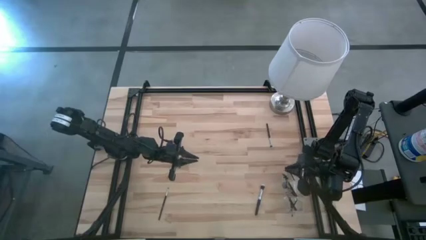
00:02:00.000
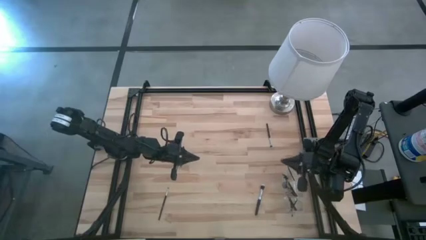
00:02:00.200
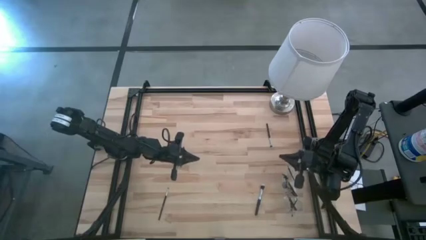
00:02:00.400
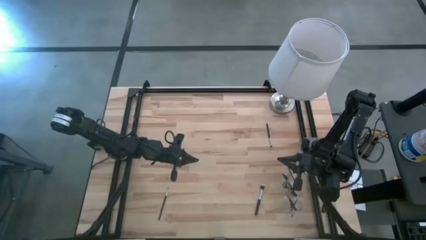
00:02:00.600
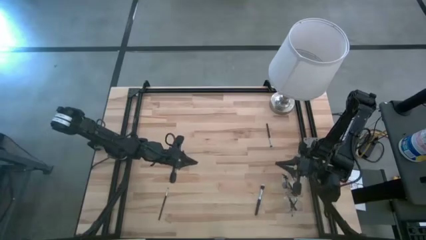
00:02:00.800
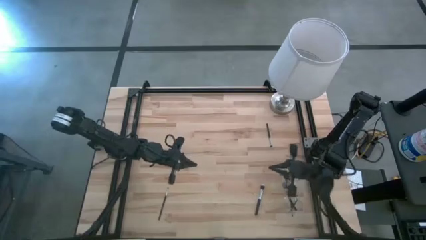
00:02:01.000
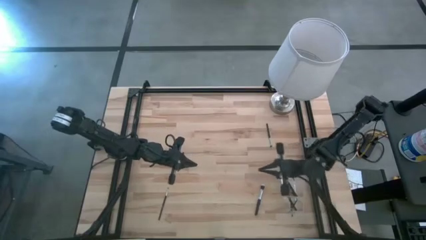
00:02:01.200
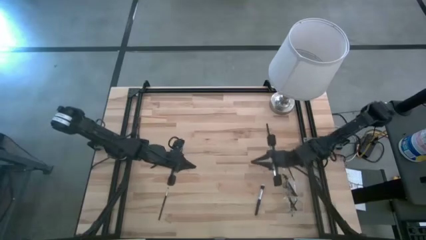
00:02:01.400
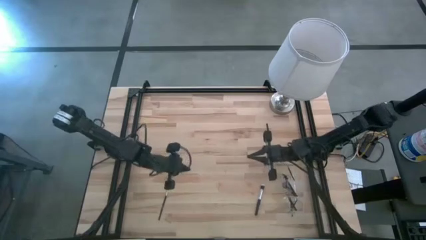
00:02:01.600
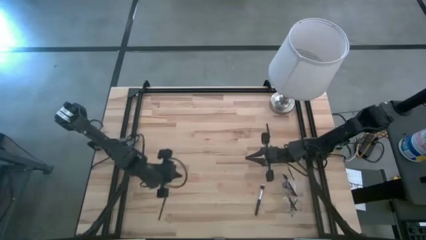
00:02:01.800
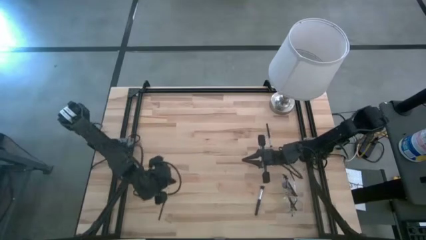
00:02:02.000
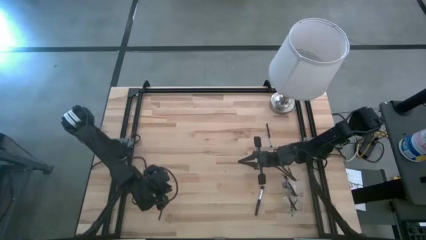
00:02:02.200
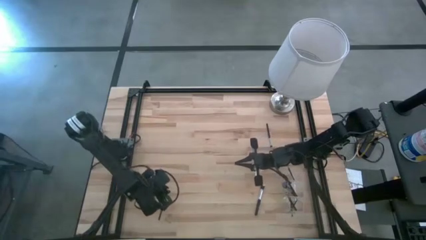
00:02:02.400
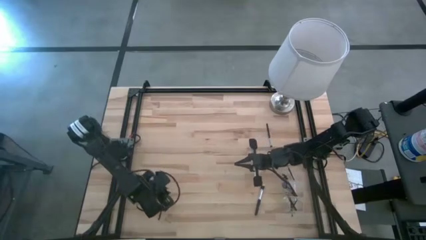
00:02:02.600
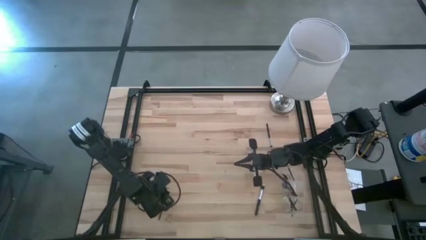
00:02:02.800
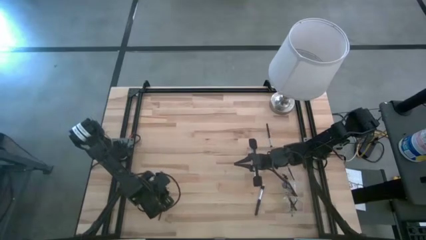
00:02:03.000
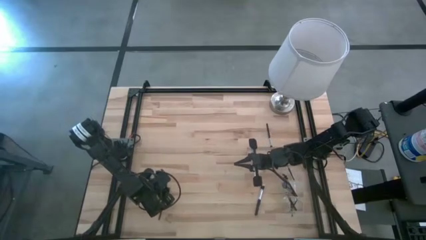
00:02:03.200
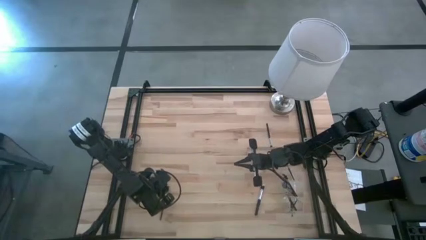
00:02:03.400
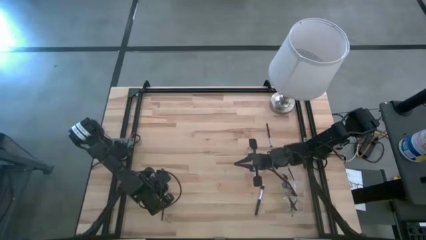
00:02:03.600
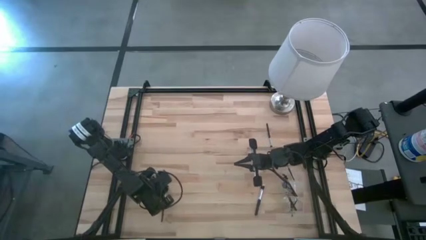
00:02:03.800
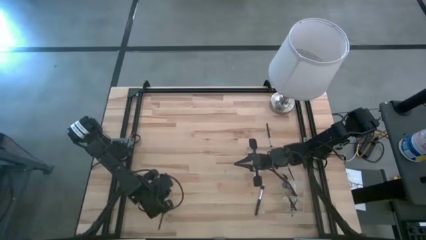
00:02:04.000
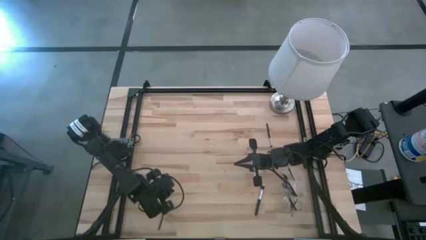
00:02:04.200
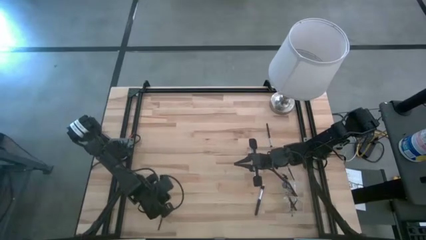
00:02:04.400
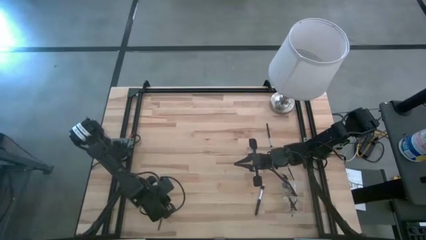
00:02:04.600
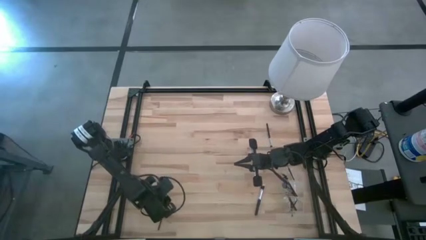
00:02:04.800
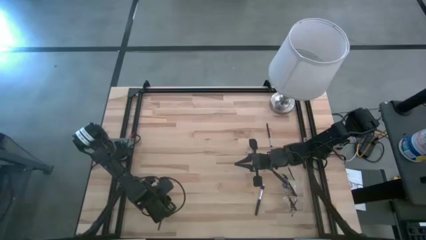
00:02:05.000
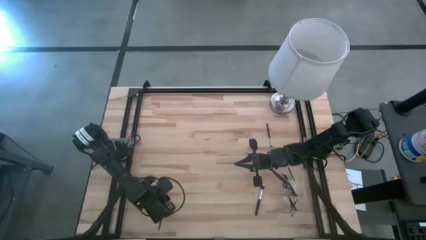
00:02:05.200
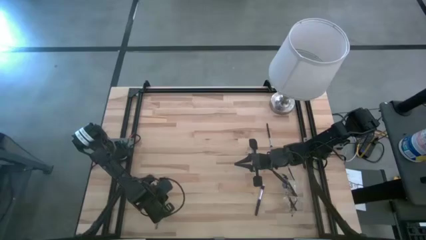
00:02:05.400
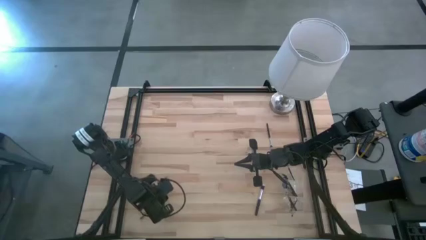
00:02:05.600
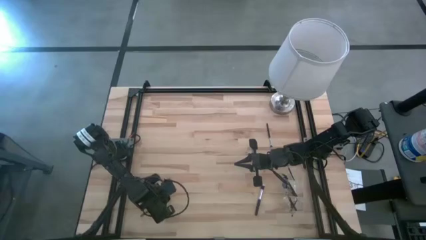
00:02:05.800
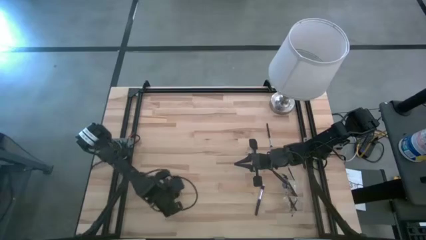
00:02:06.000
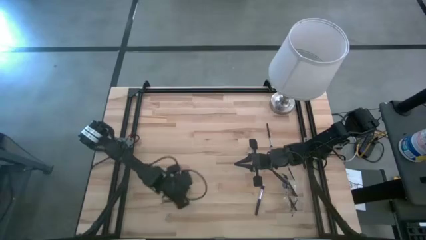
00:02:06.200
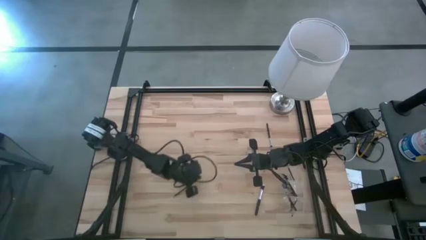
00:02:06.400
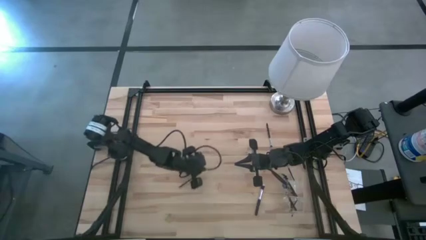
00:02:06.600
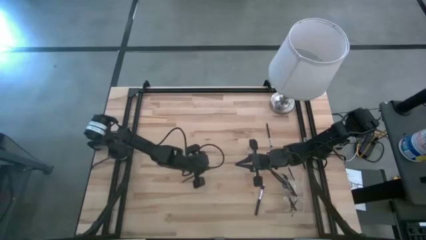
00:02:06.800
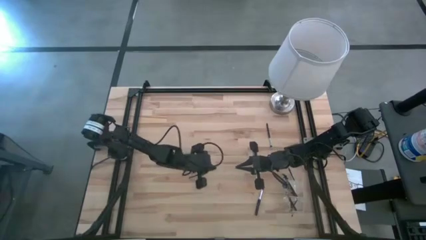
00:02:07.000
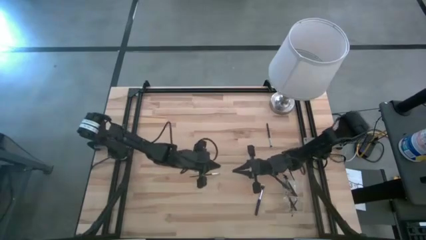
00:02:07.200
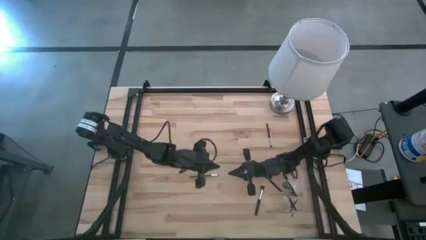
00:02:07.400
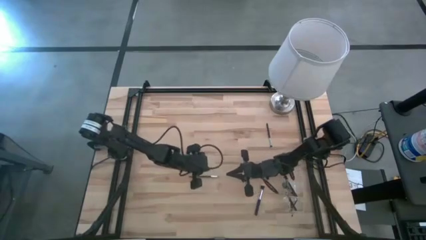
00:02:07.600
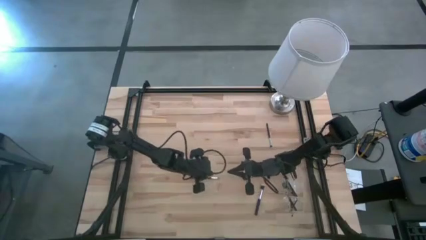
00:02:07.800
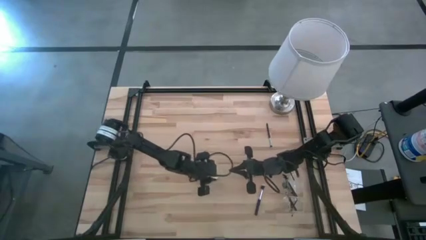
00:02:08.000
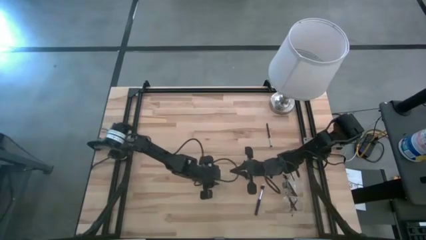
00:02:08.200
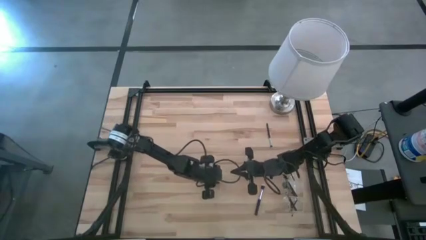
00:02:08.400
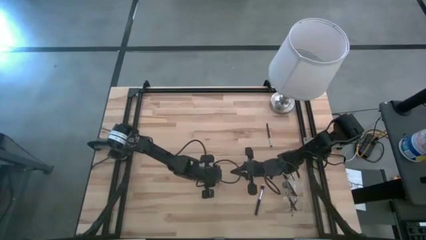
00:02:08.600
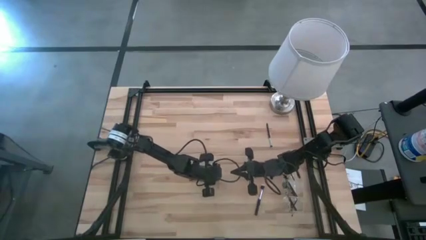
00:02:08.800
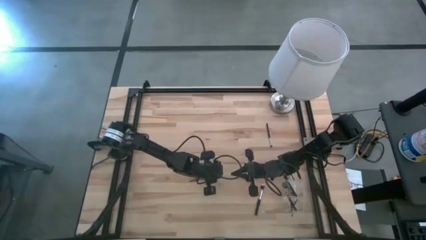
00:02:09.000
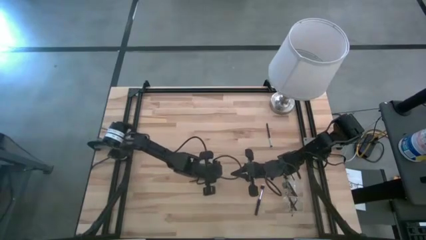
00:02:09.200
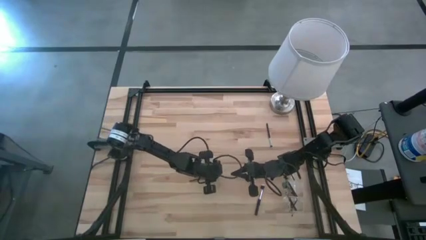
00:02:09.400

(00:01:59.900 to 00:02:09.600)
Task: Put items in baskets/containers
Put the eyeshadow brush into the transparent organizer

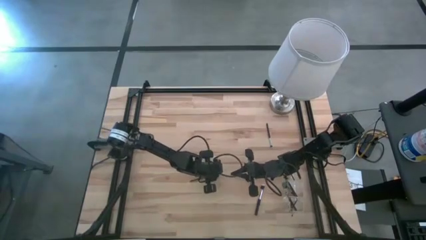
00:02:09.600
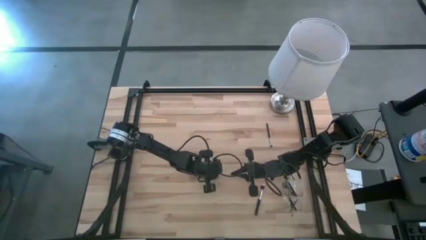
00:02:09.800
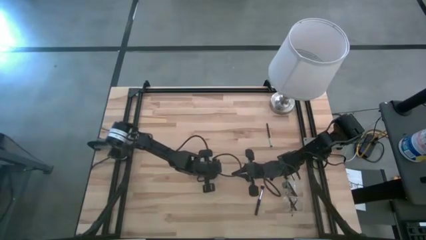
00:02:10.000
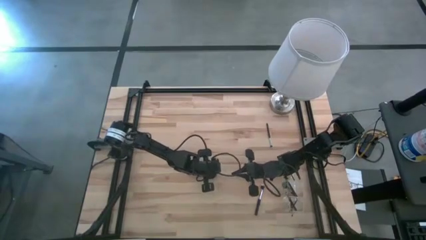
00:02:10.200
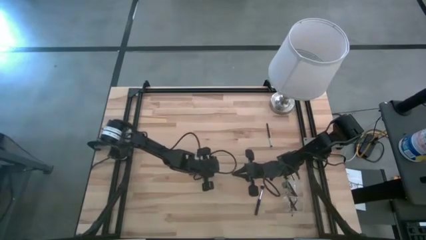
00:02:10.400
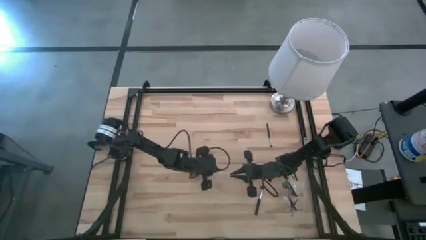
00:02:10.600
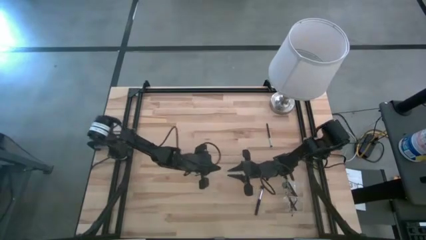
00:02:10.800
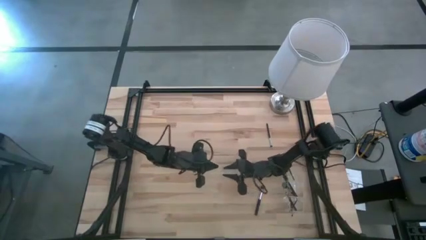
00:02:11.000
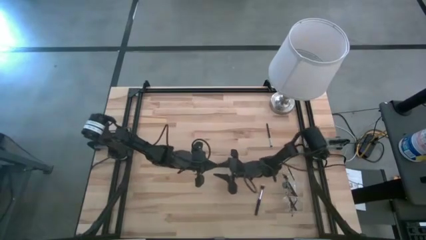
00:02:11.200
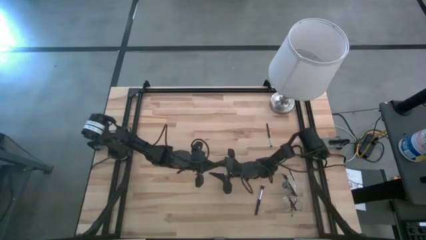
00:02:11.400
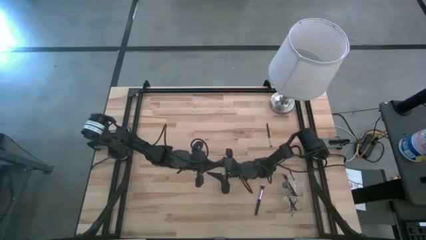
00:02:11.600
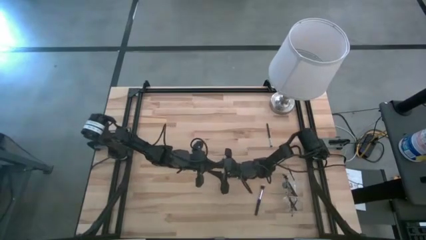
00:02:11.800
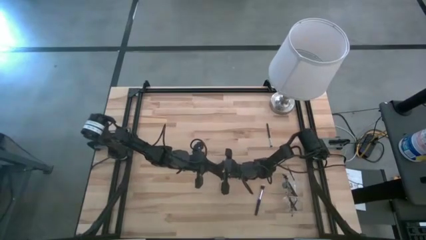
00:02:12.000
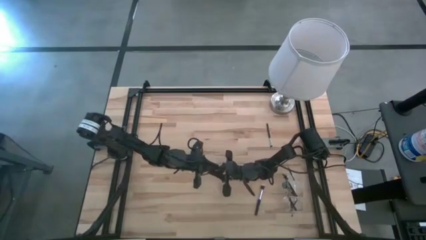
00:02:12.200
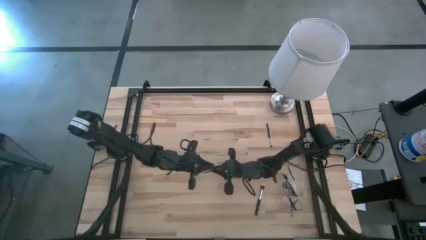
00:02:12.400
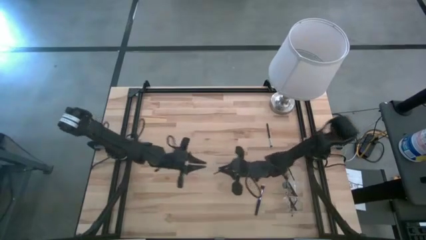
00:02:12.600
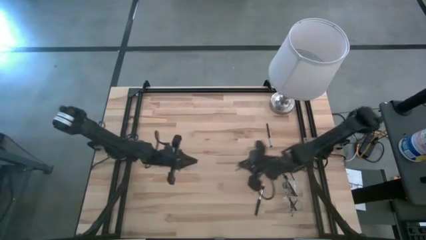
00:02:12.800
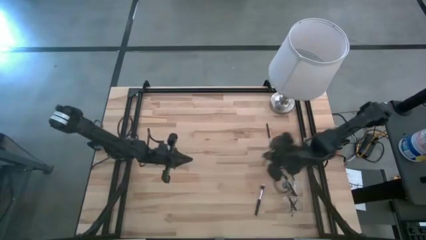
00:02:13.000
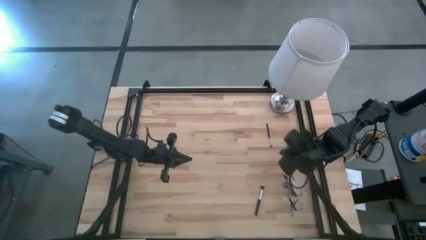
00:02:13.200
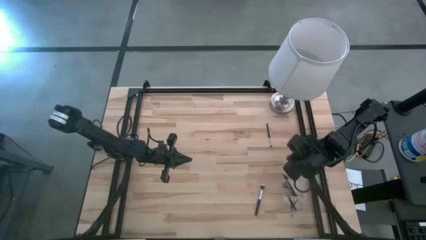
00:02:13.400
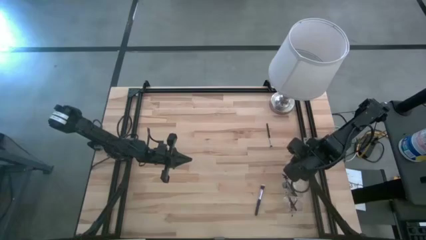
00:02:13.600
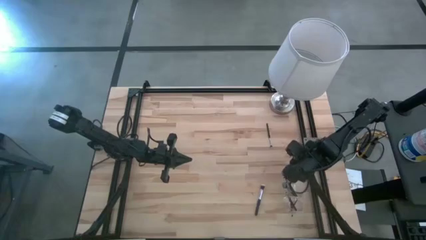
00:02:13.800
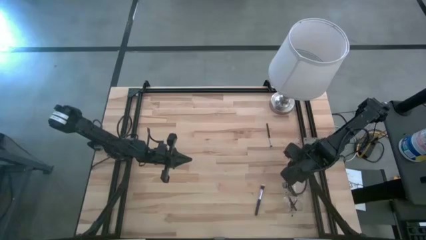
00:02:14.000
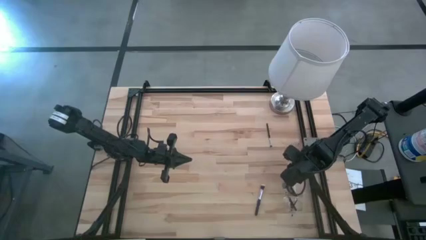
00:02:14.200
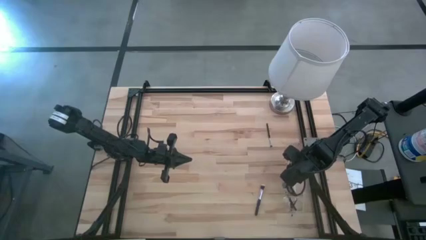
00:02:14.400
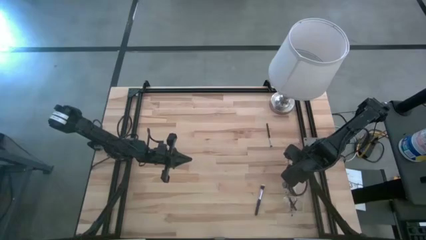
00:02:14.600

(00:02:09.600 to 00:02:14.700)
Put the eyeshadow brush into the transparent organizer
